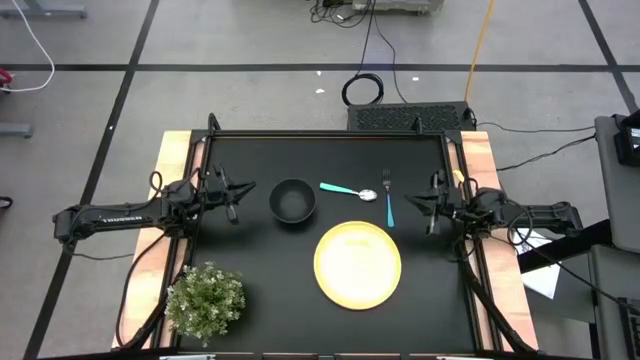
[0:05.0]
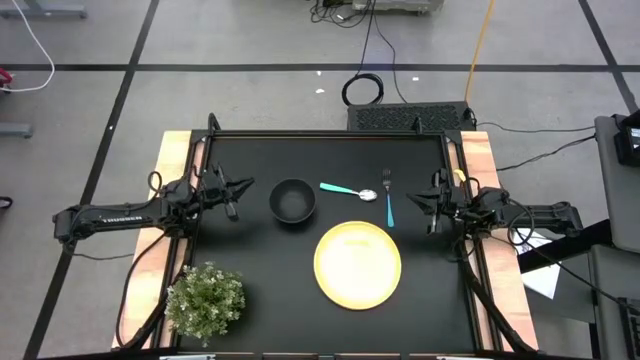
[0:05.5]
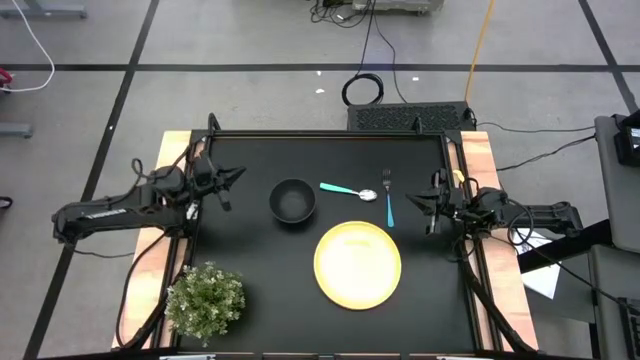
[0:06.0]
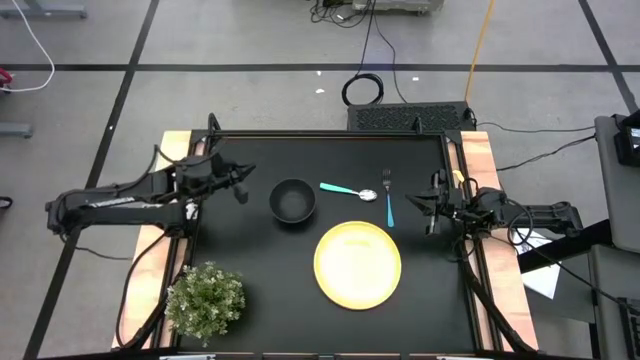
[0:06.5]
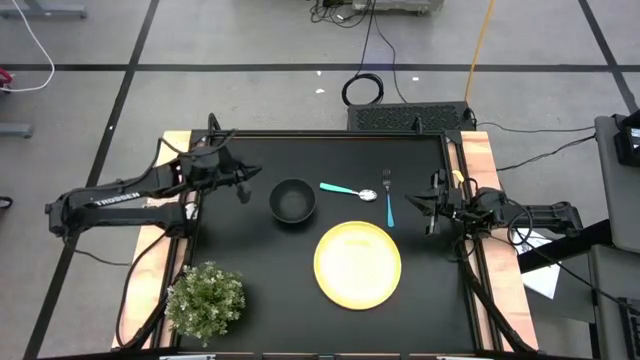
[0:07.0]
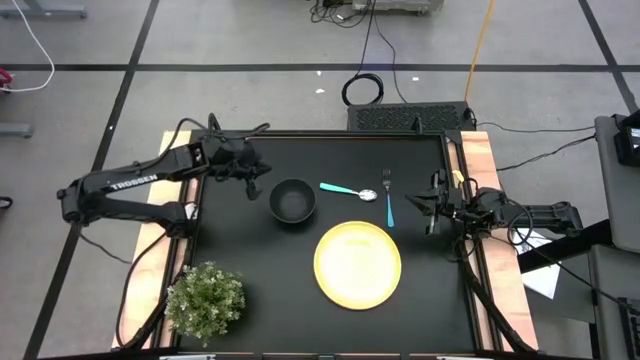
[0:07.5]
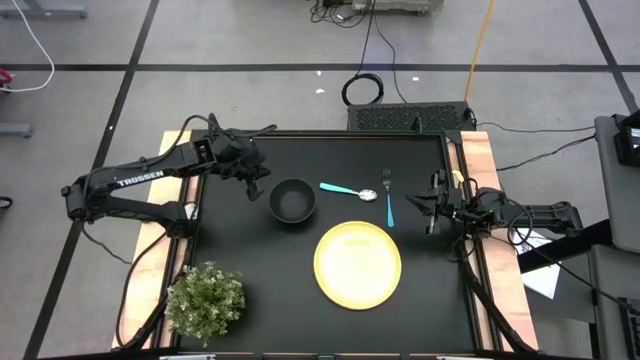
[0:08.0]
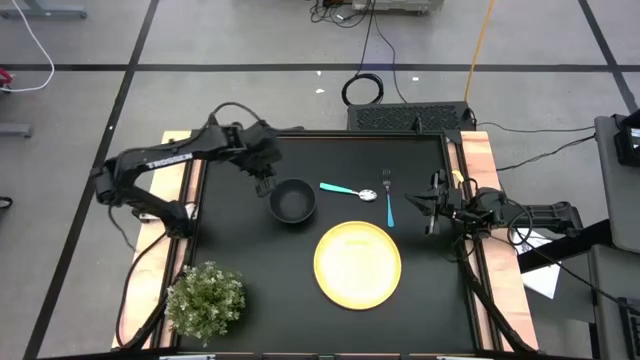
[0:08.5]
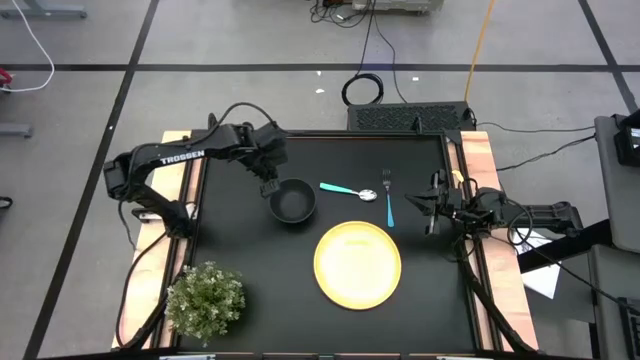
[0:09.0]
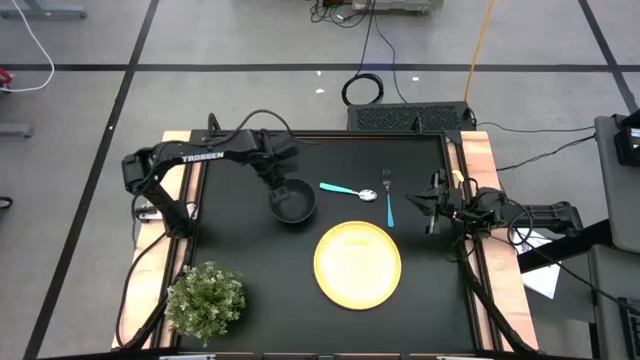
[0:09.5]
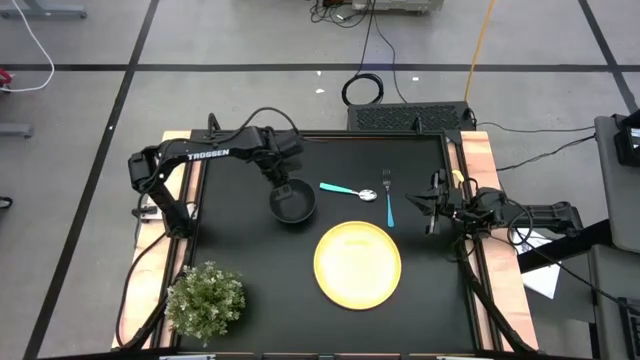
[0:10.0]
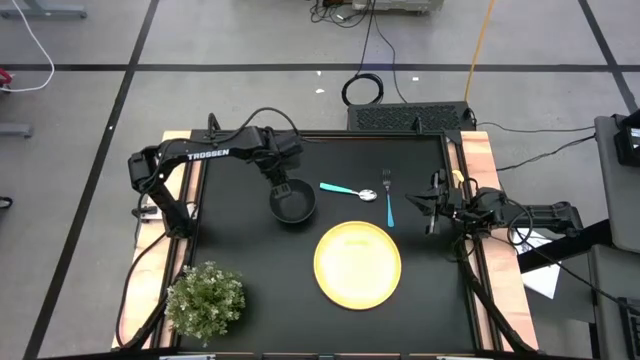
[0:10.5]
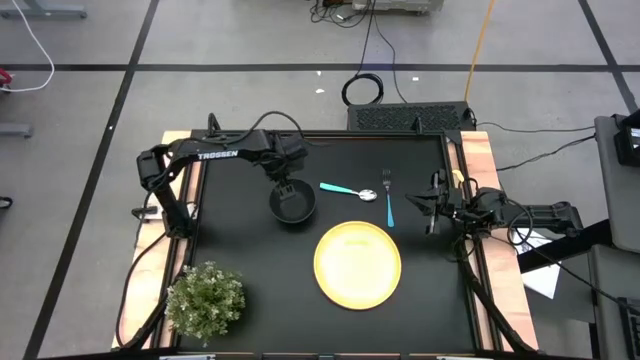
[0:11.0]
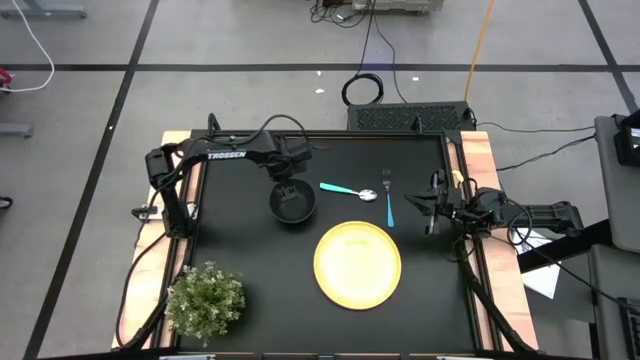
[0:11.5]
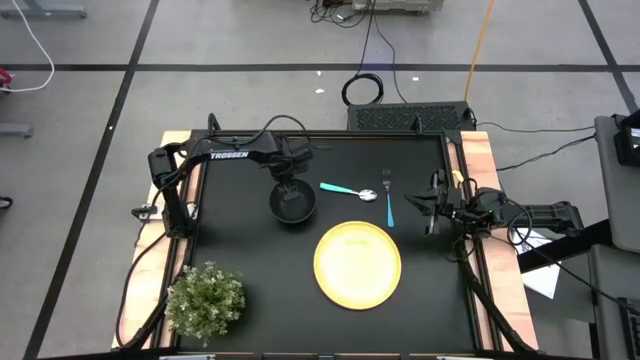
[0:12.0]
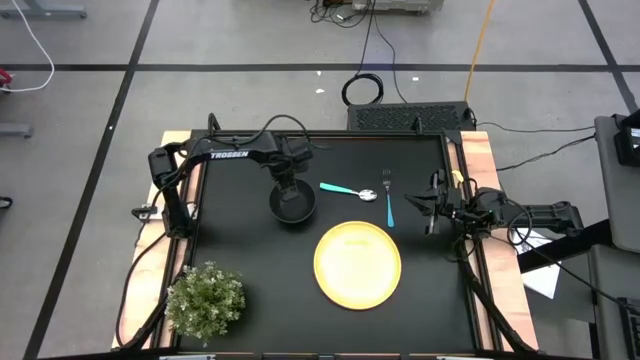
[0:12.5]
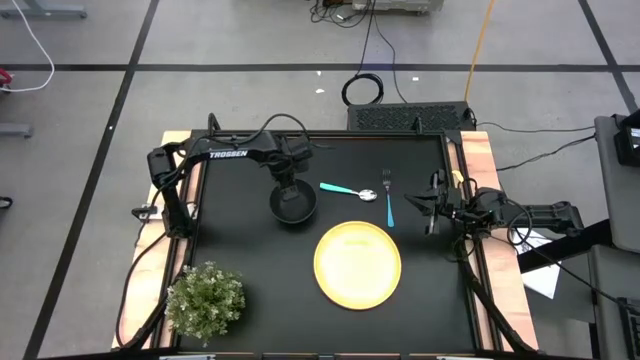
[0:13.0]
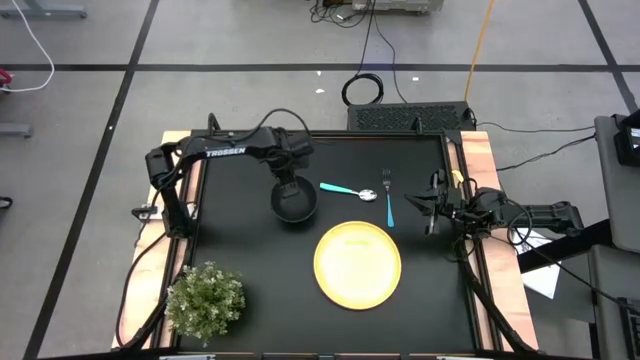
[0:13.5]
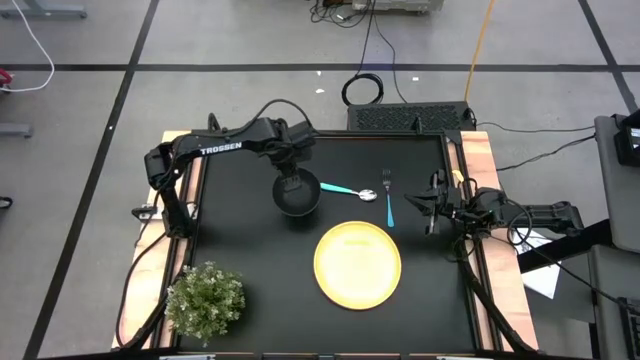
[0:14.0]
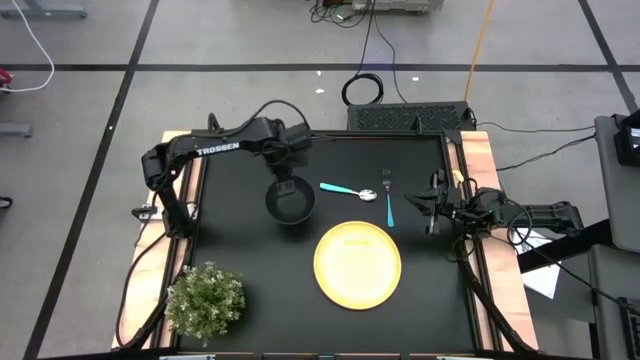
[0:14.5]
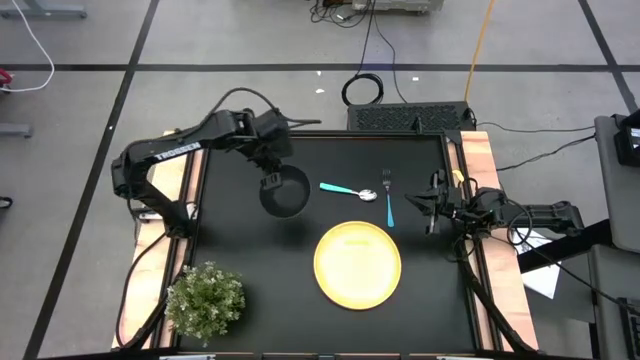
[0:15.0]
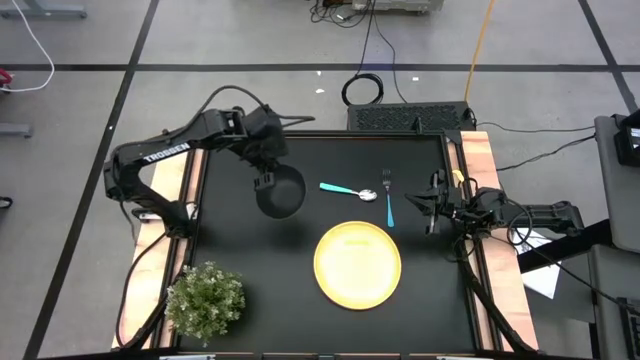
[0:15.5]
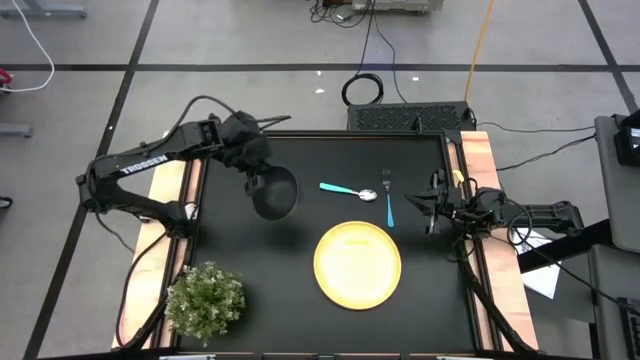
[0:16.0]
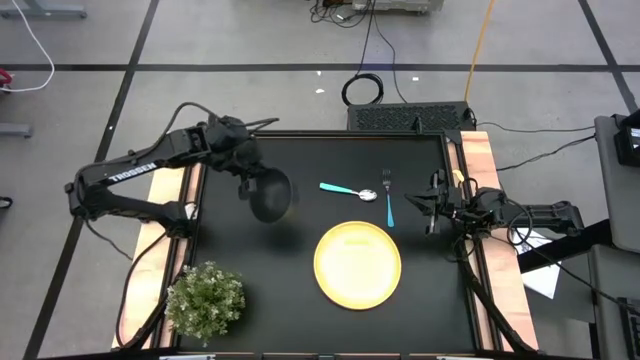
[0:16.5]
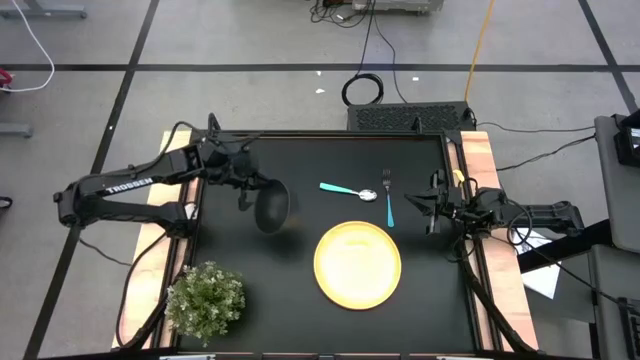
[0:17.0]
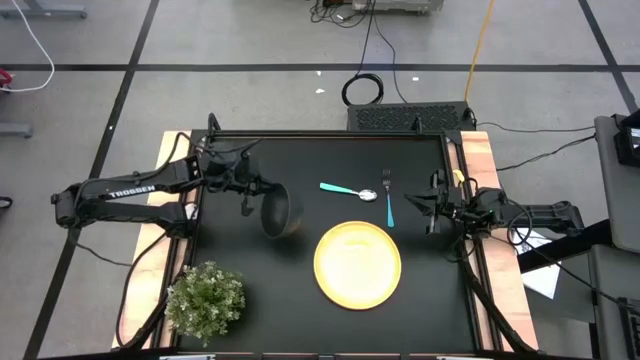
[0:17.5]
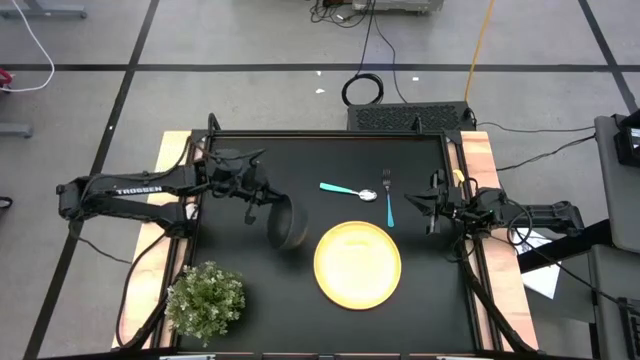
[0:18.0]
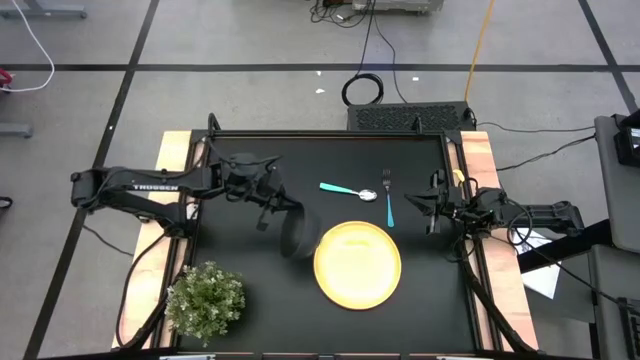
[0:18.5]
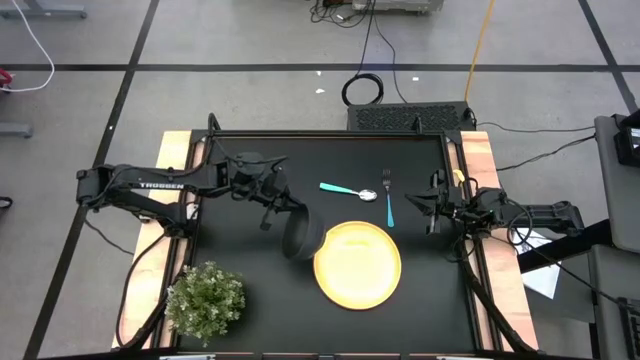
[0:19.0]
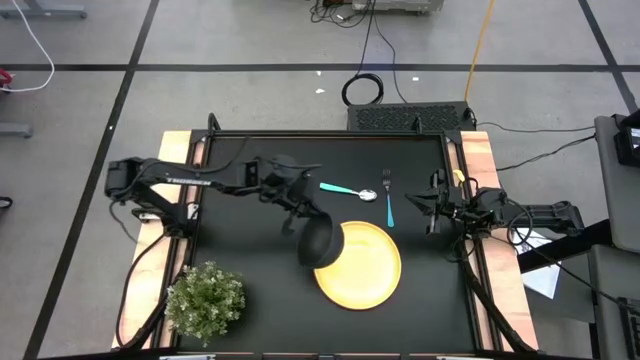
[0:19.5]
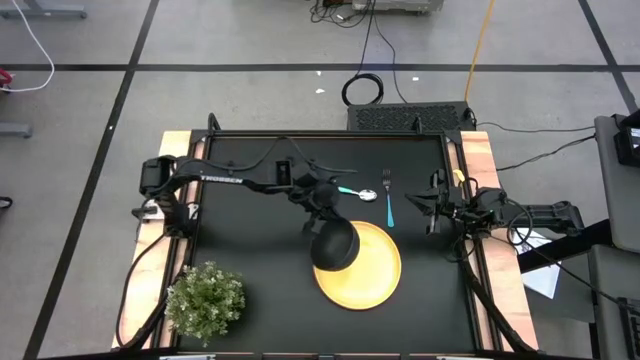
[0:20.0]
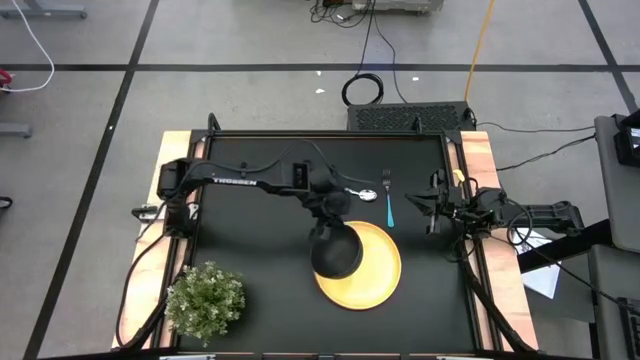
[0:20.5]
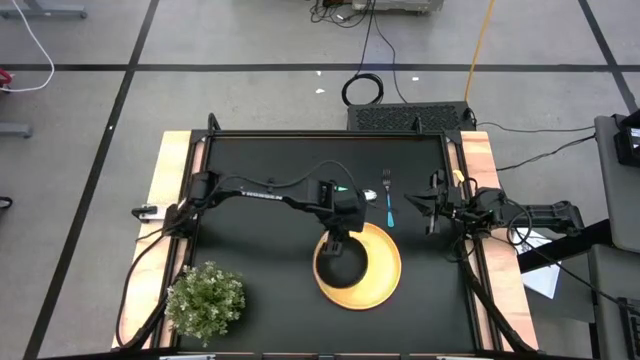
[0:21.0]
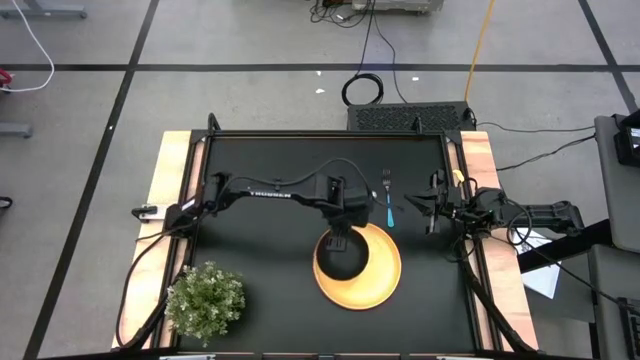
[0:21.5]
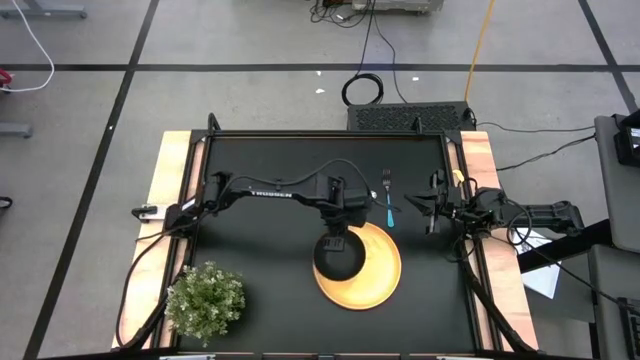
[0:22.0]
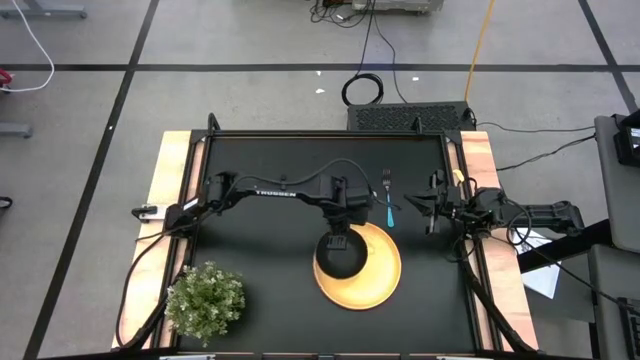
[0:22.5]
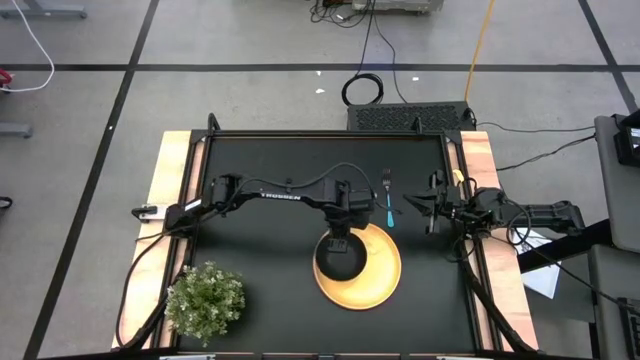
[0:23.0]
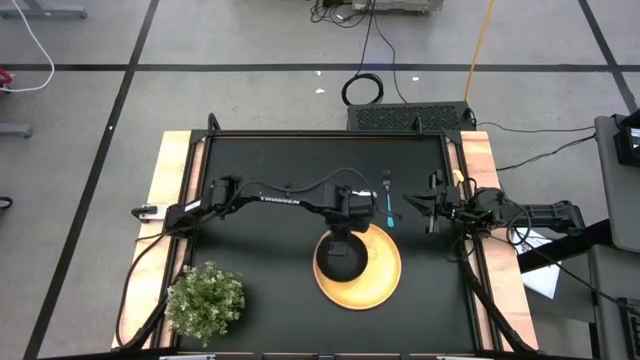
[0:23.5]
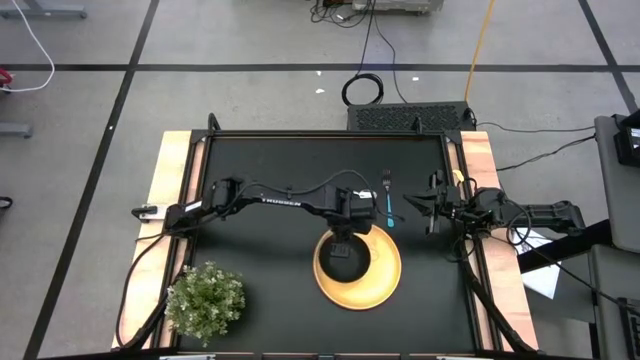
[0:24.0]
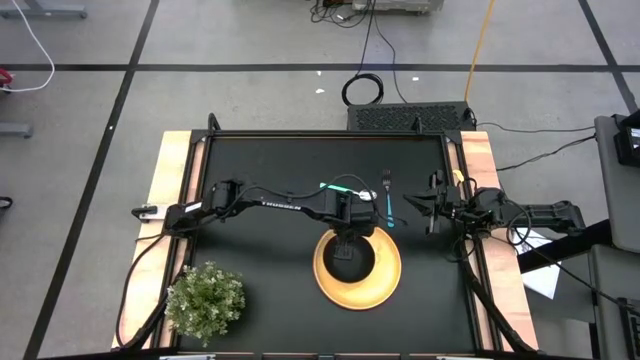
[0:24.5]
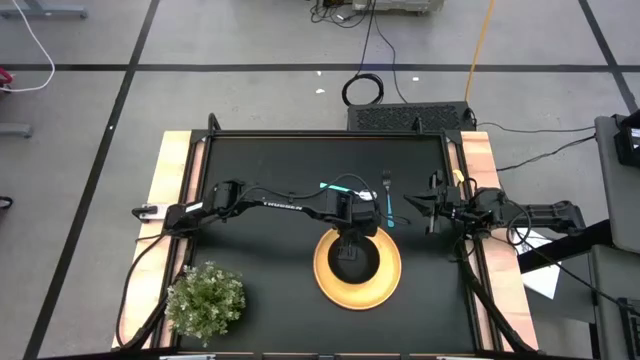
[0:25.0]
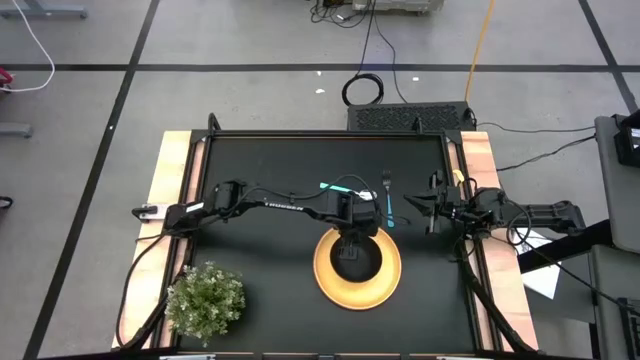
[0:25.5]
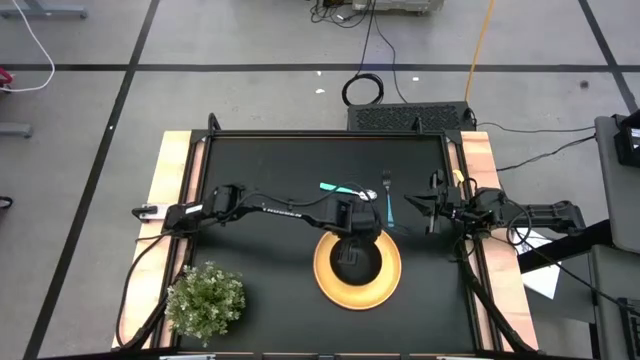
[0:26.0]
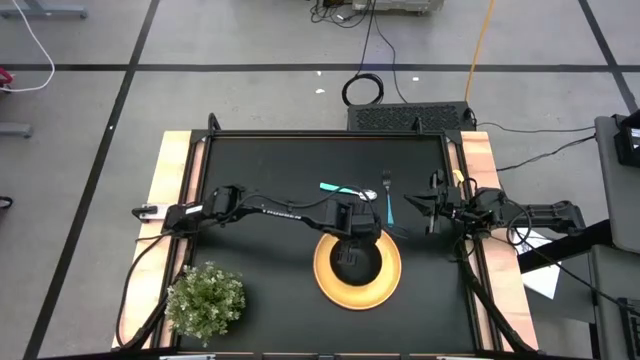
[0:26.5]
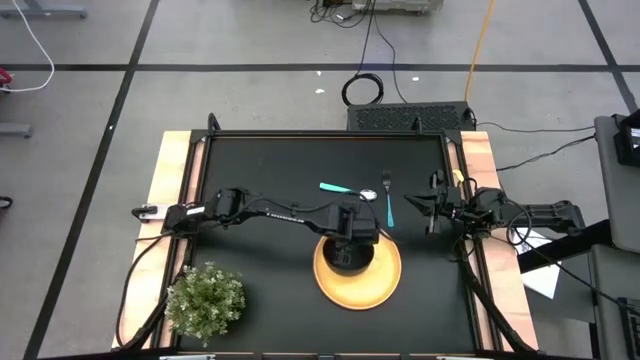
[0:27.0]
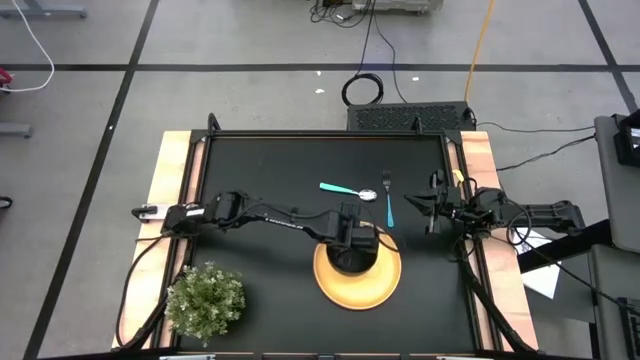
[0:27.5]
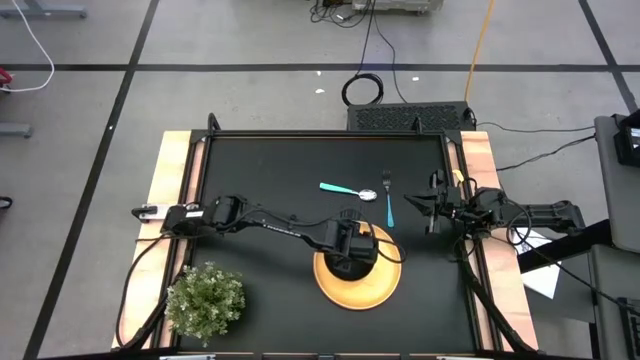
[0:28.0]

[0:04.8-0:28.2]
Task: Set table place
Put the black bowl on the yellow plate
